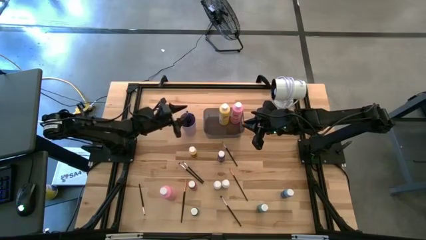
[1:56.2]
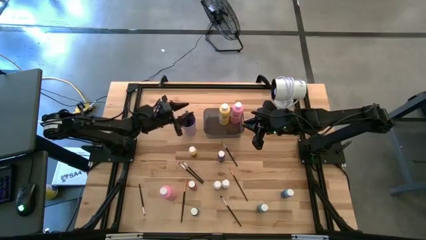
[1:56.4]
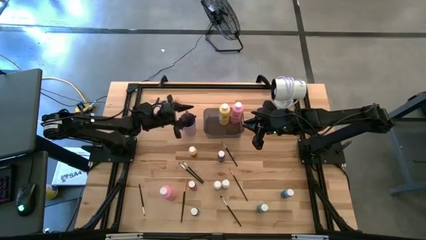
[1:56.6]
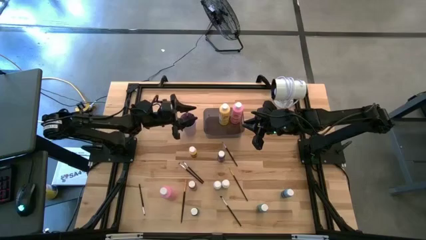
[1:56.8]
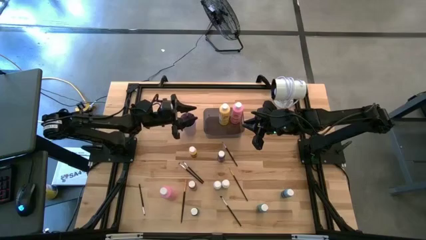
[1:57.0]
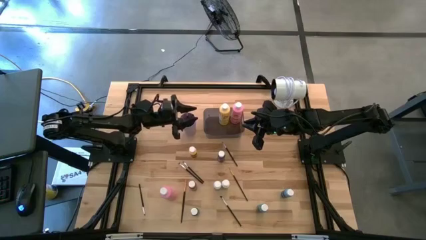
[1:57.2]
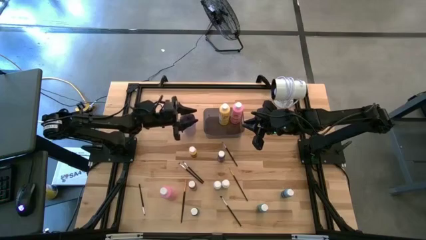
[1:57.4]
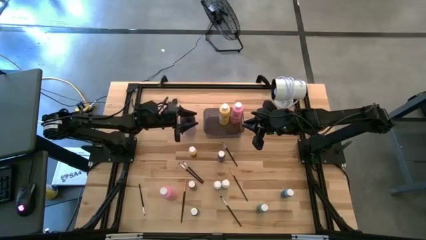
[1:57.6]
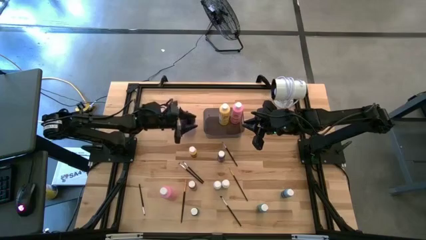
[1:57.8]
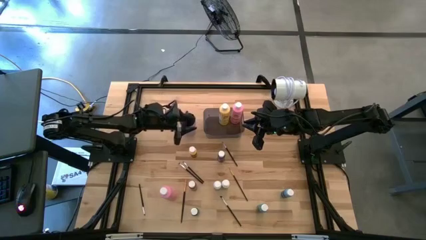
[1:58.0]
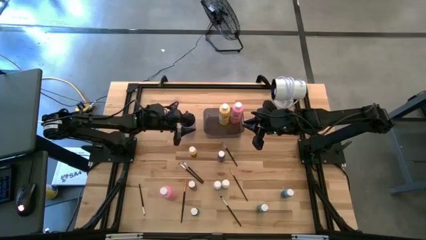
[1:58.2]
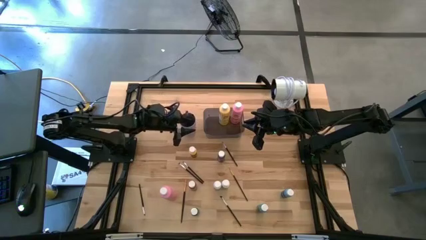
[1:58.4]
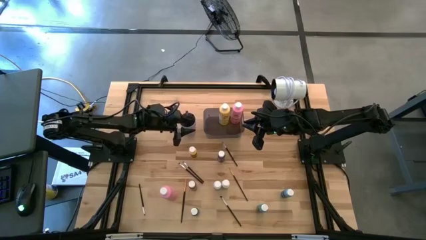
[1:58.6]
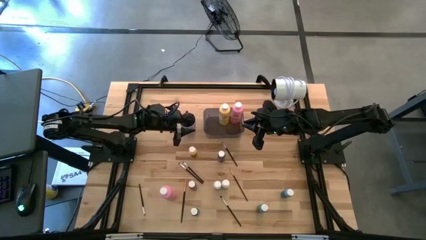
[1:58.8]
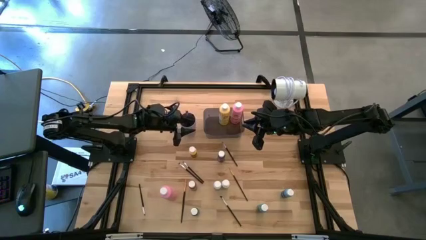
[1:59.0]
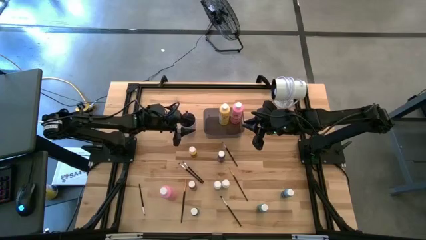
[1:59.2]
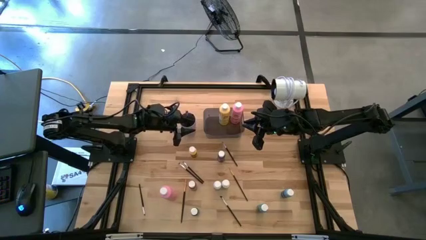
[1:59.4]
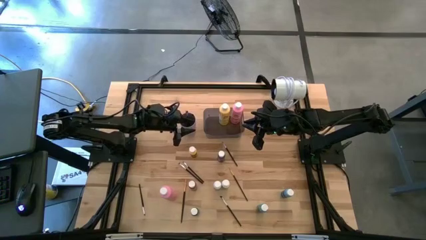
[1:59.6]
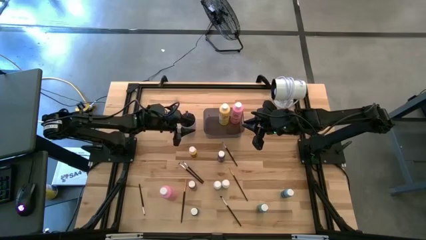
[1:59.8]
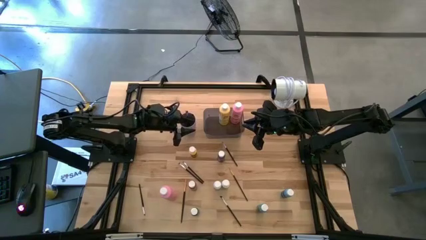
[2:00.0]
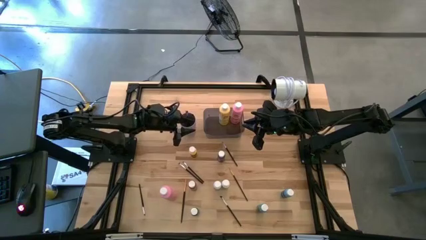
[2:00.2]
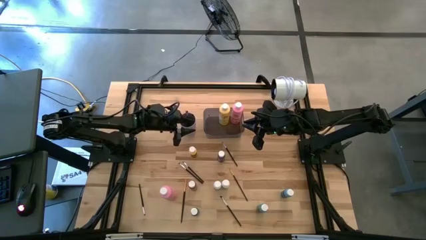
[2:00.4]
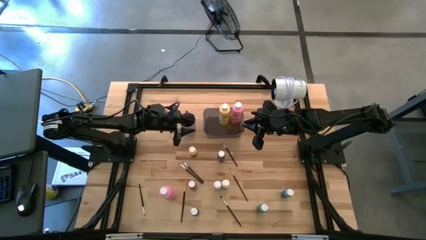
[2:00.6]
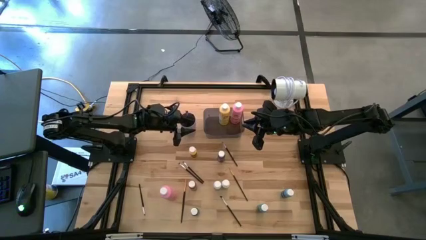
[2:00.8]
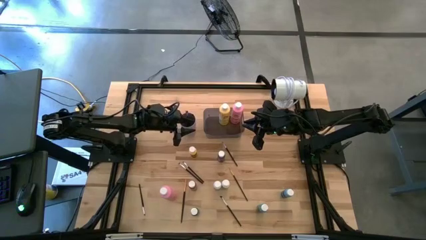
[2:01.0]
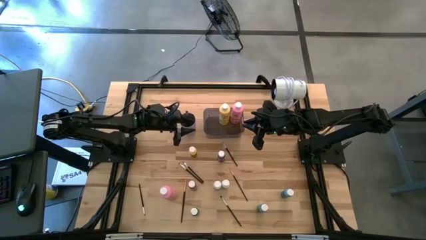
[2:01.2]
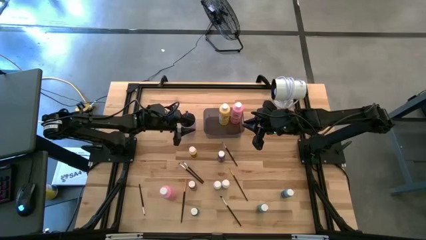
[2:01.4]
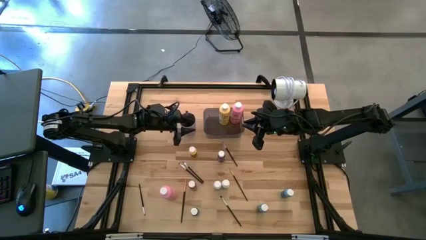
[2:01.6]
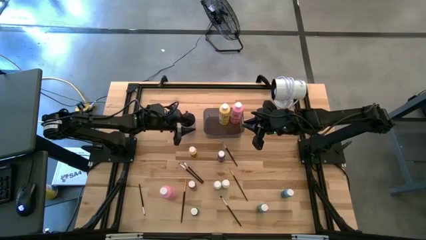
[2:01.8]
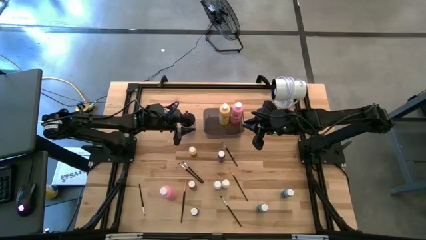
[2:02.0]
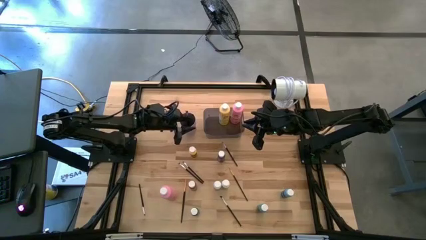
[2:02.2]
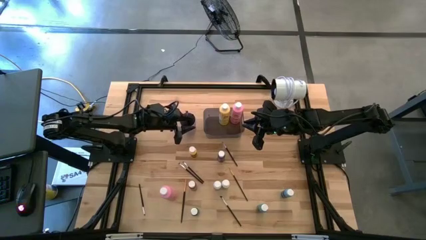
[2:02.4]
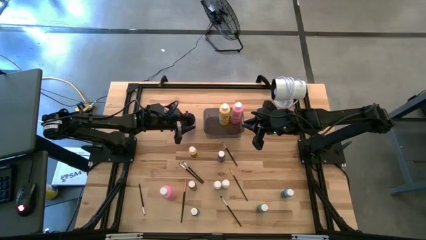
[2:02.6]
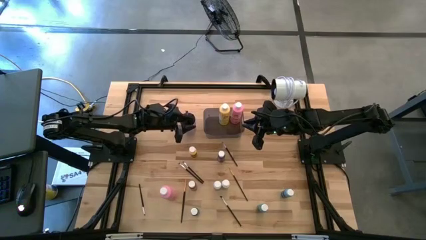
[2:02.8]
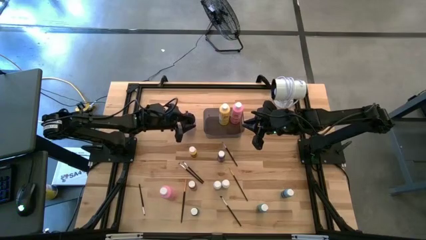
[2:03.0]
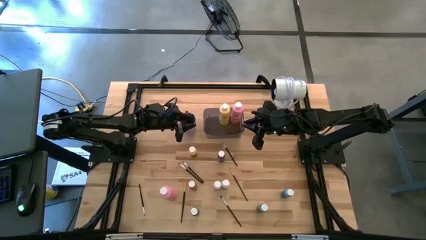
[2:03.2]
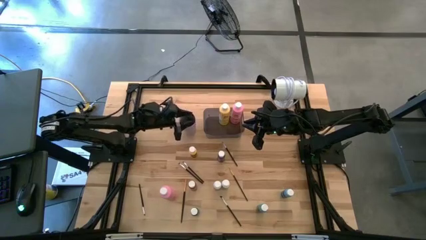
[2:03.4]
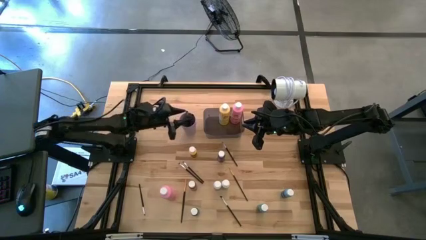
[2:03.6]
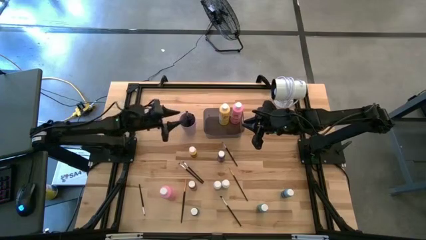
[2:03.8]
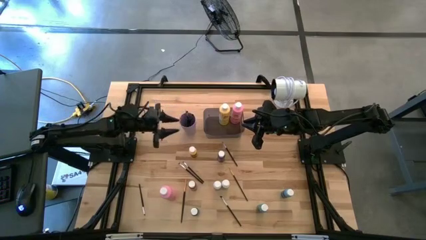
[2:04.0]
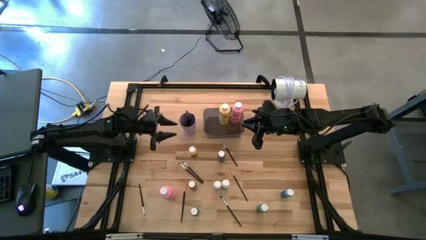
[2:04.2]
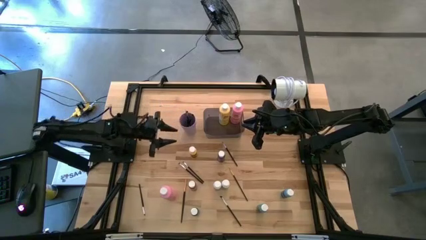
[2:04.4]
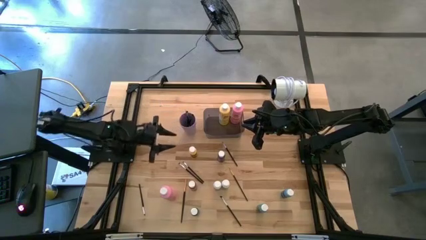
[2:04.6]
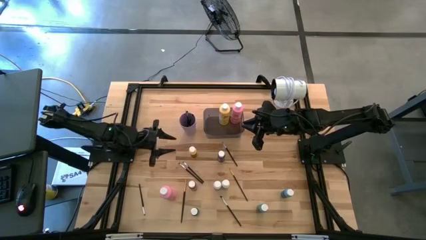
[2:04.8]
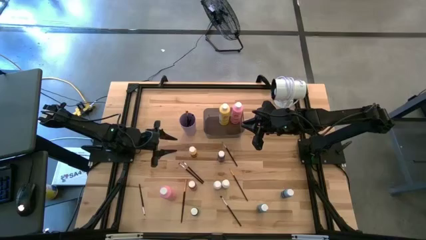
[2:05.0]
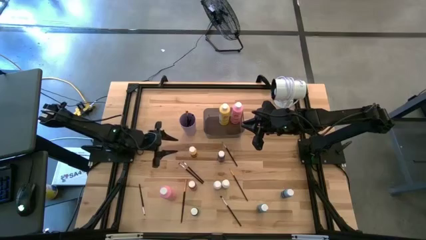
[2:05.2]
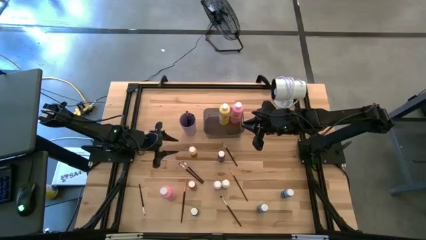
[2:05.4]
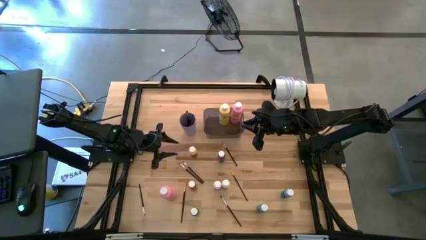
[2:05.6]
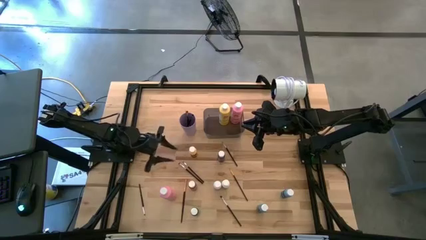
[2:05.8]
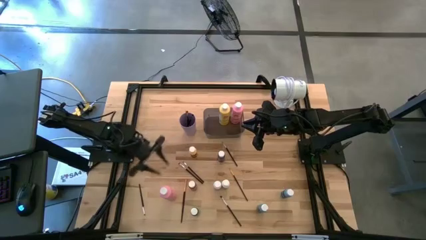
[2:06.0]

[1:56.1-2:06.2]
Task: Pick & Place Paint Supplies
Put the big pink paint bottle into the gray bin

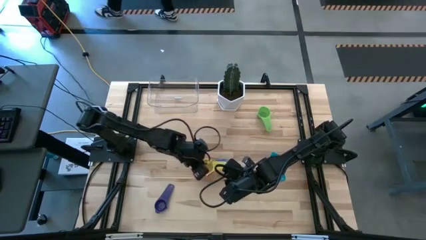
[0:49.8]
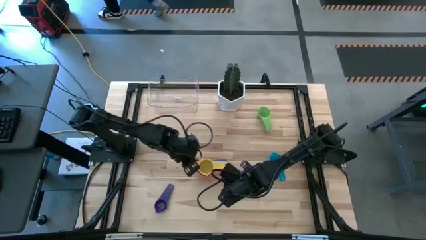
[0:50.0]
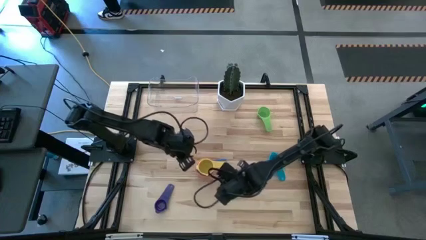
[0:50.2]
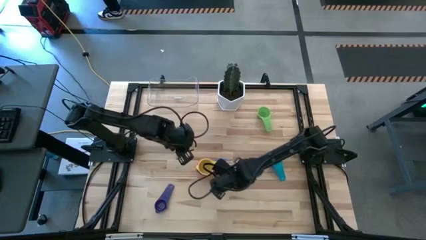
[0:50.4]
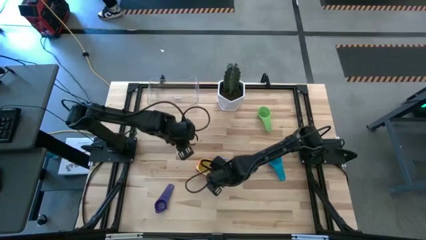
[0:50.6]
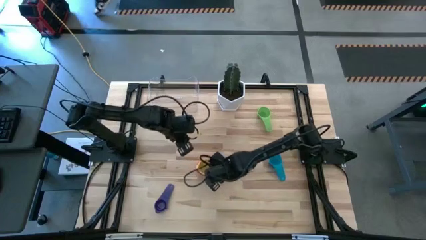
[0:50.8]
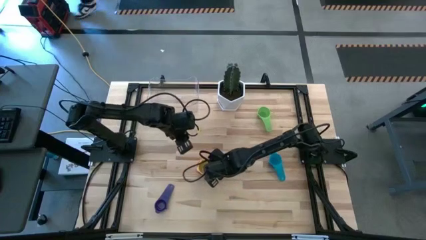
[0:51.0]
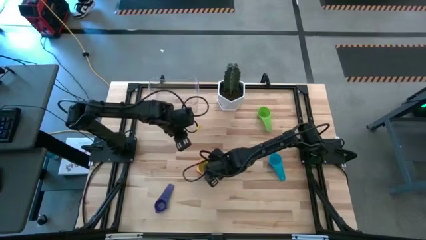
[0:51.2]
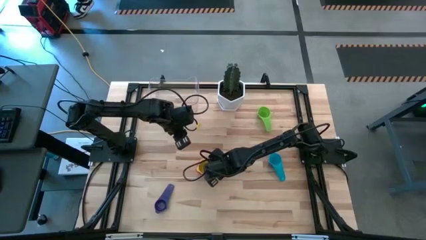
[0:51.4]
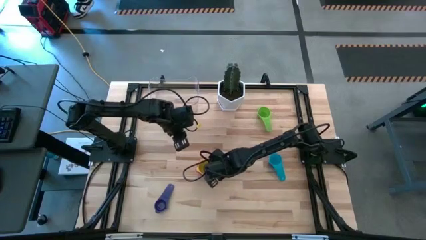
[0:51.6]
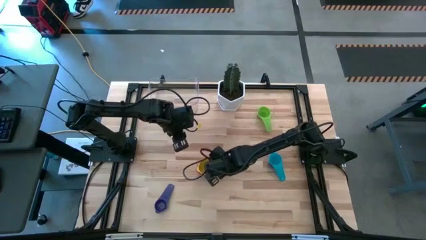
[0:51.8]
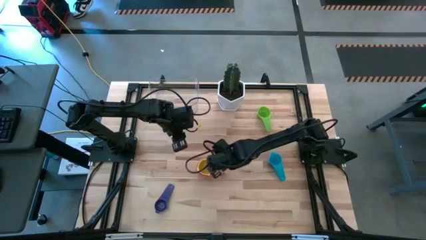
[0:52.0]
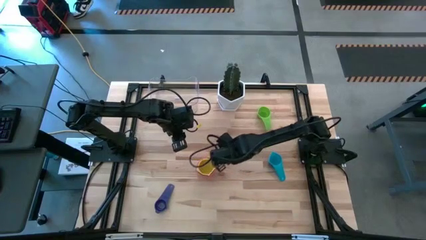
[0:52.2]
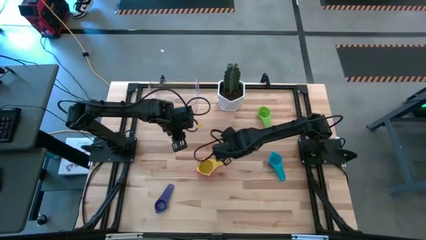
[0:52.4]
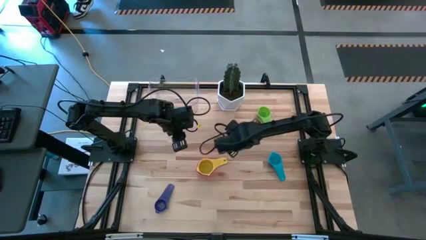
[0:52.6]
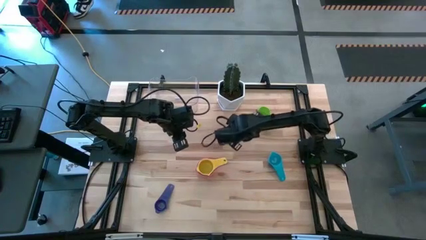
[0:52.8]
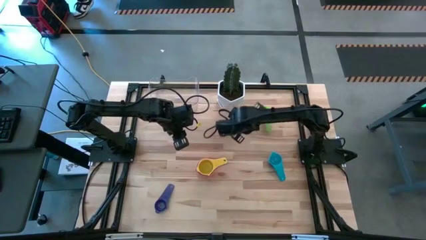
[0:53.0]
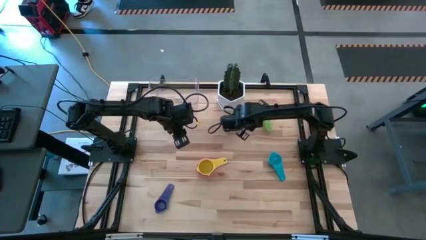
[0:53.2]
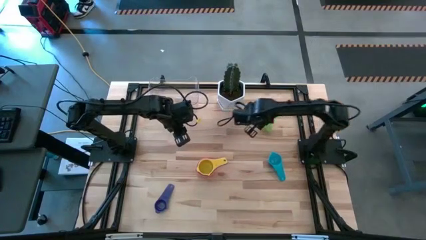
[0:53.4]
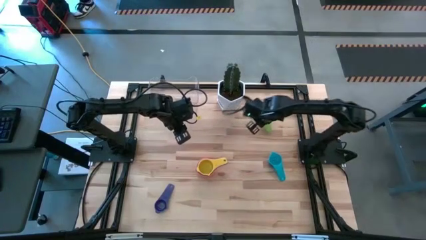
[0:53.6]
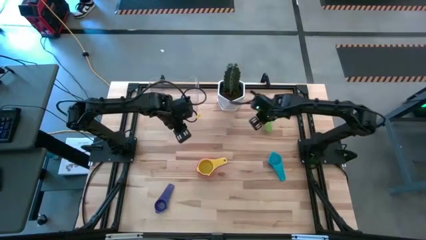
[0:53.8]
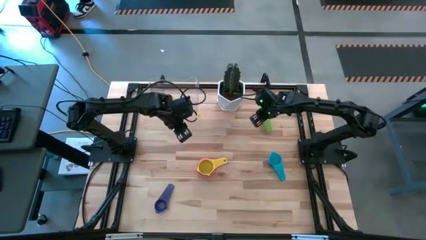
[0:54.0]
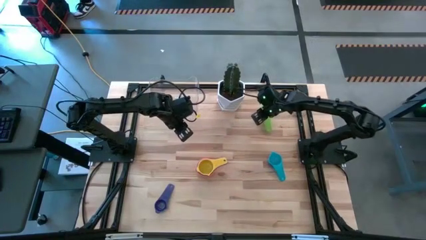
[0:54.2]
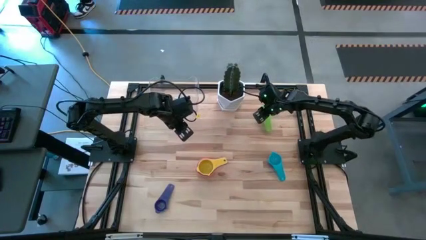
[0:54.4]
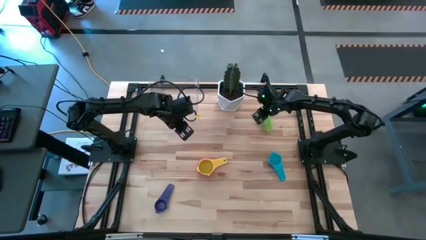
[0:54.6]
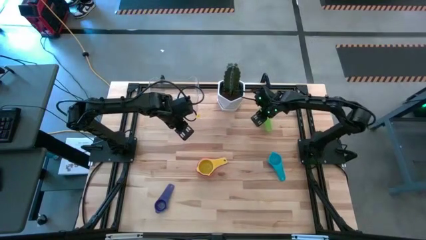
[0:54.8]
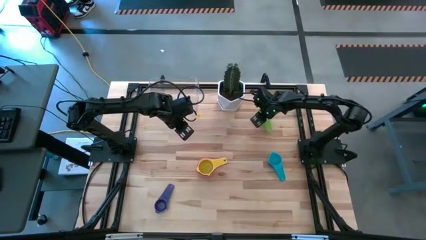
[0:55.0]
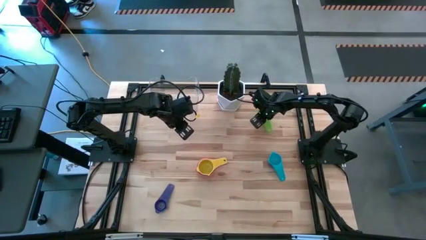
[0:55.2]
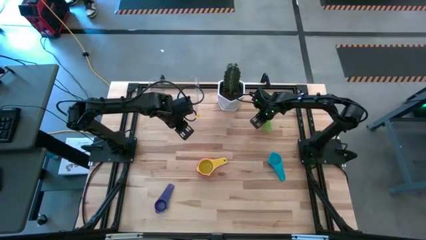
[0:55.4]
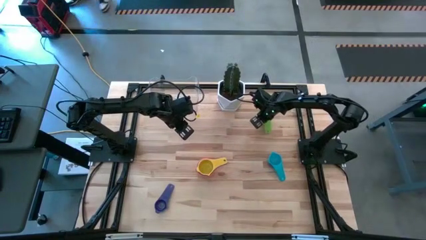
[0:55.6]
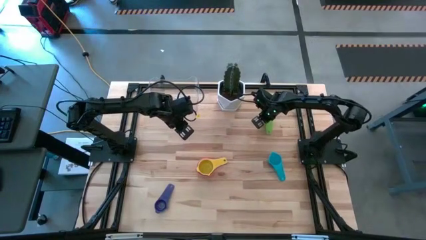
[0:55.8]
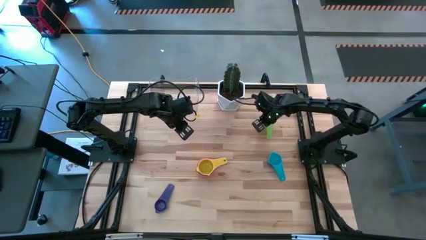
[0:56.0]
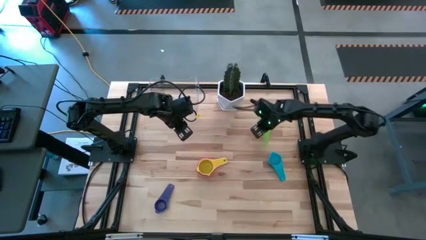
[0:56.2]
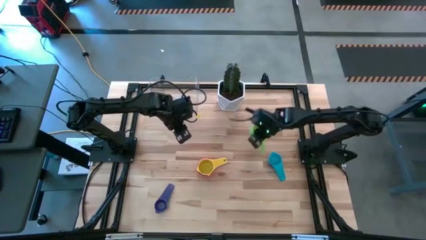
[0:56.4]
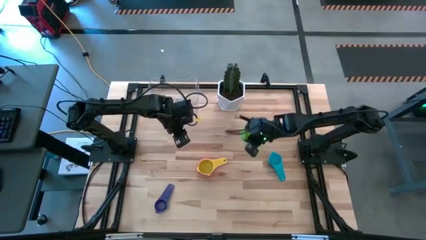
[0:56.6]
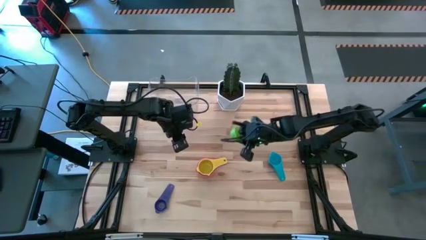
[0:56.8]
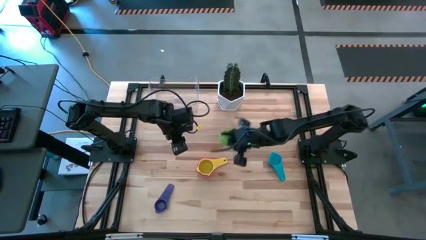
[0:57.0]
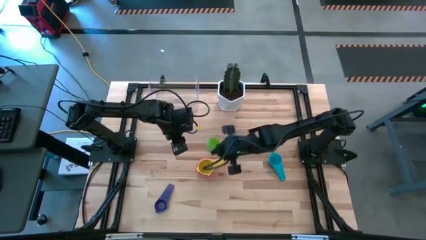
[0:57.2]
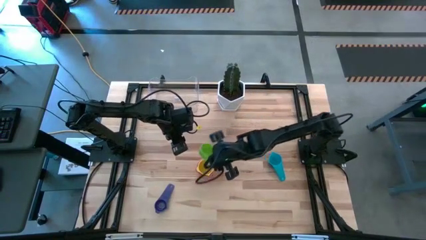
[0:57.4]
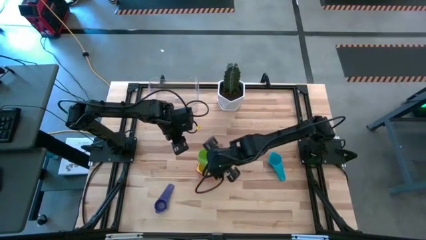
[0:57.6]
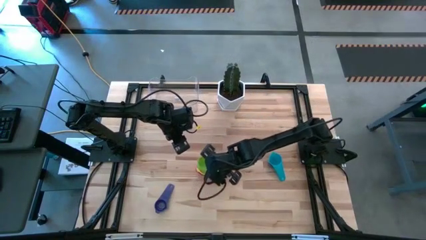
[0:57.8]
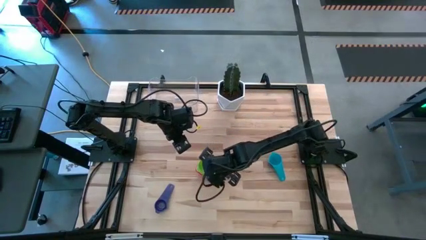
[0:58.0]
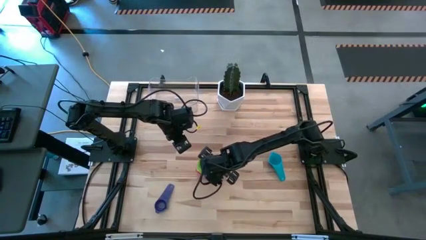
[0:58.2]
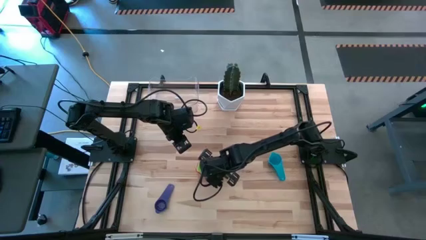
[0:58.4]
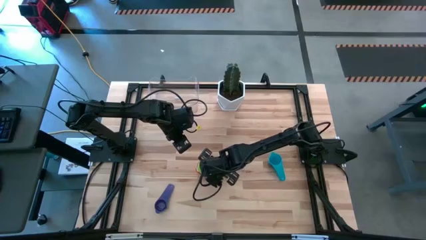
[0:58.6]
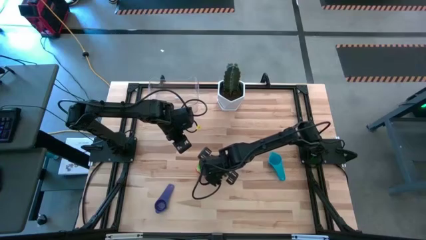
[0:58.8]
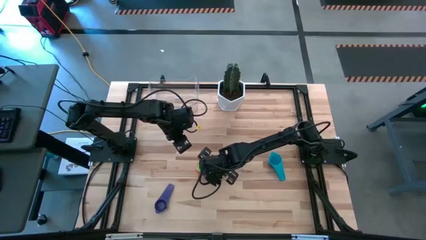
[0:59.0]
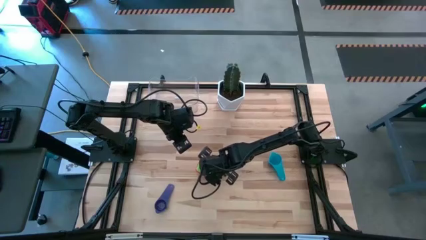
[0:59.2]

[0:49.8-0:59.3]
Task: Nest measuring cups in basket
Stack the green measuring cup on top of the yellow measuring cup
